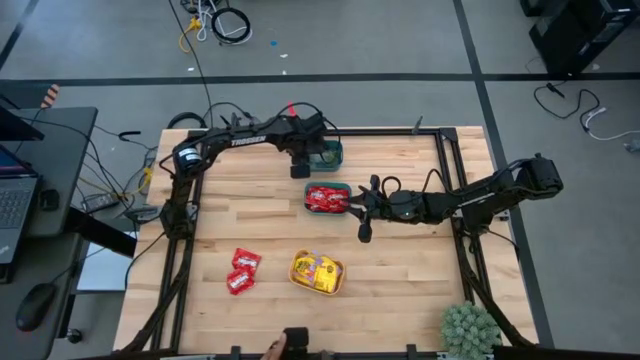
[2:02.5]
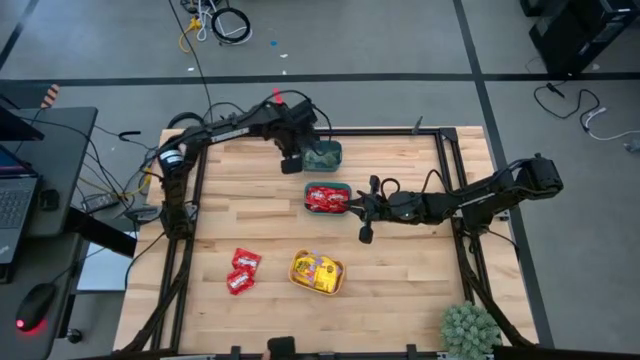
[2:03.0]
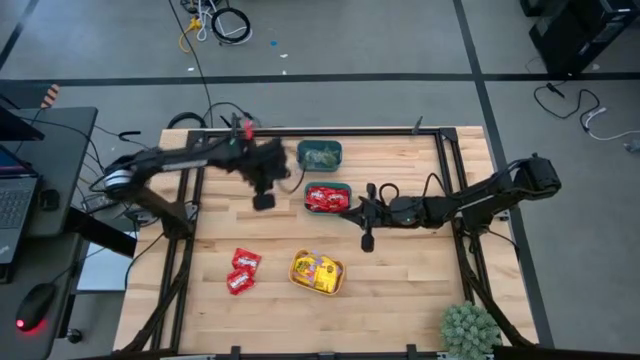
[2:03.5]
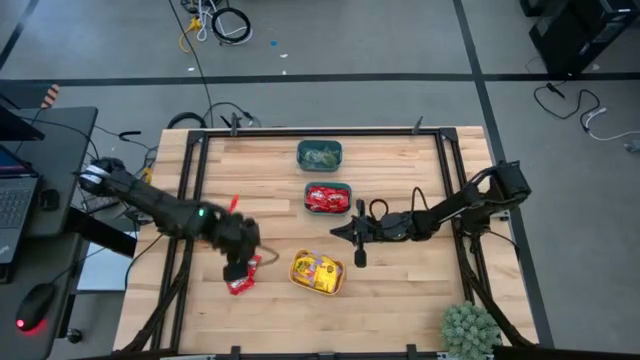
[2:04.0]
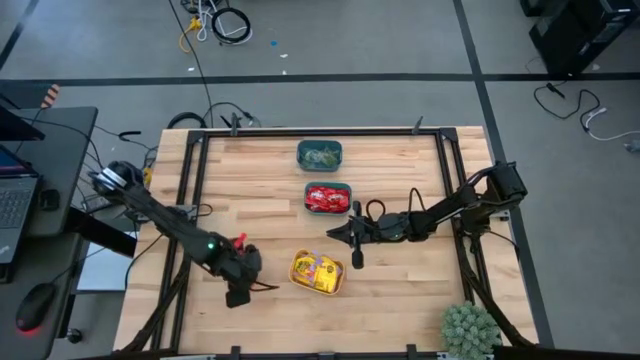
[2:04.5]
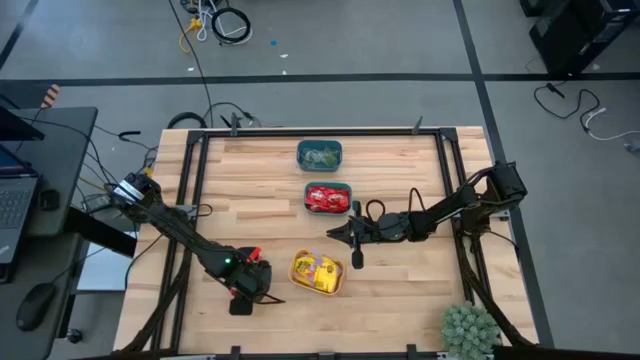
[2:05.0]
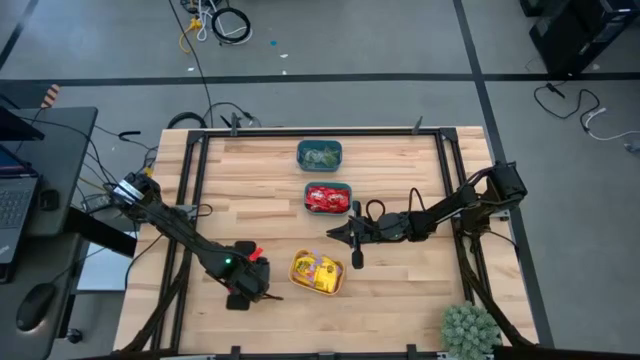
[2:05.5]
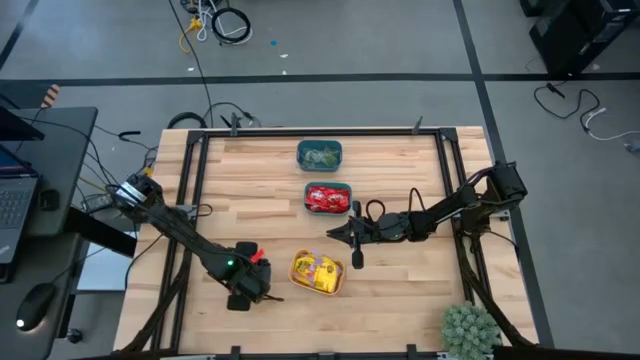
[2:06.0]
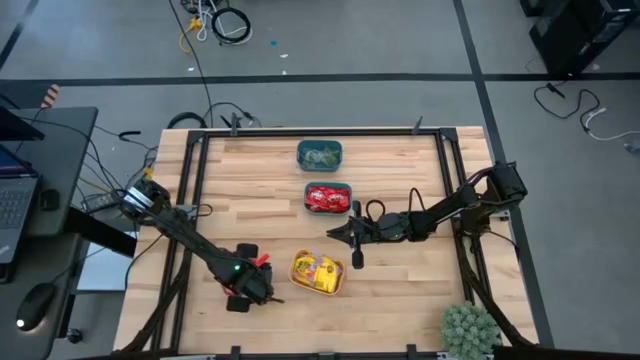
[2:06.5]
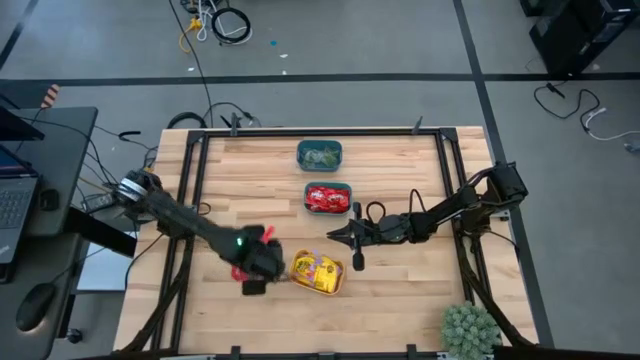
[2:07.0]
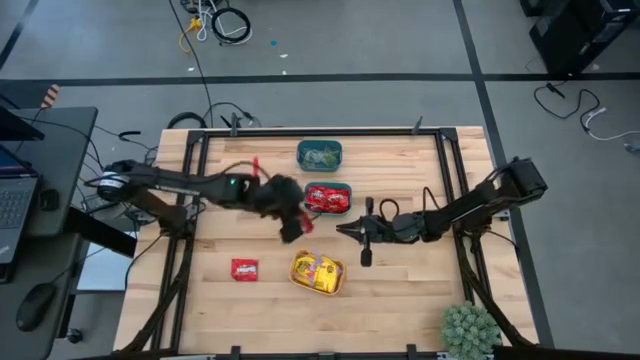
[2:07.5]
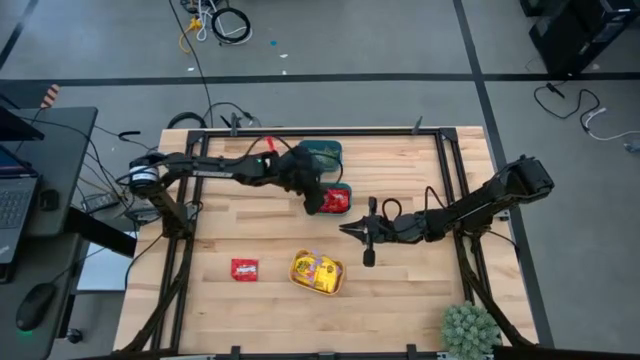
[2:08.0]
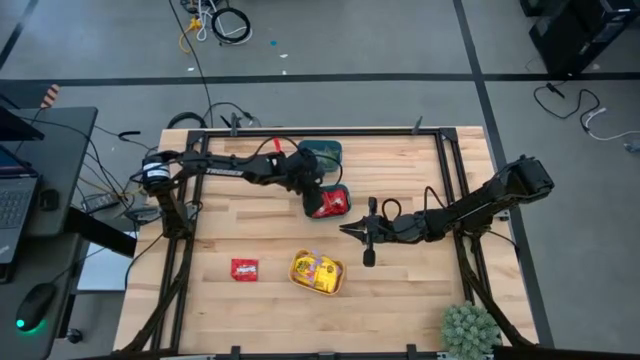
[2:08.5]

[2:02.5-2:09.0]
Task: Sort candy
Put the red candy into the green bin

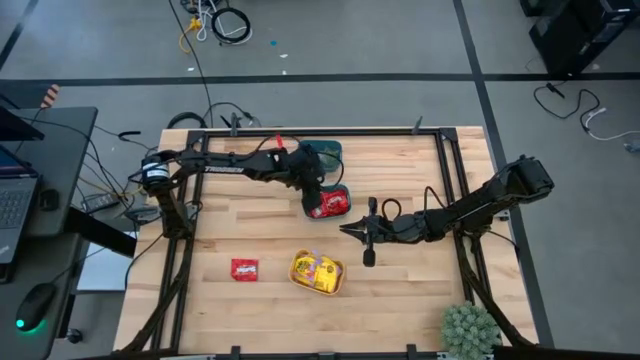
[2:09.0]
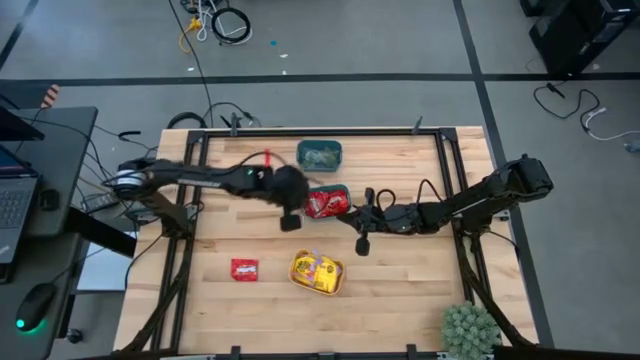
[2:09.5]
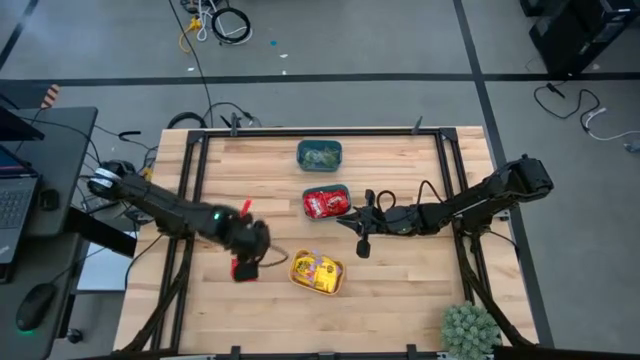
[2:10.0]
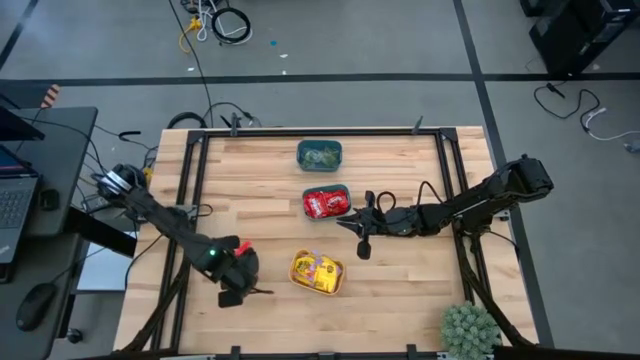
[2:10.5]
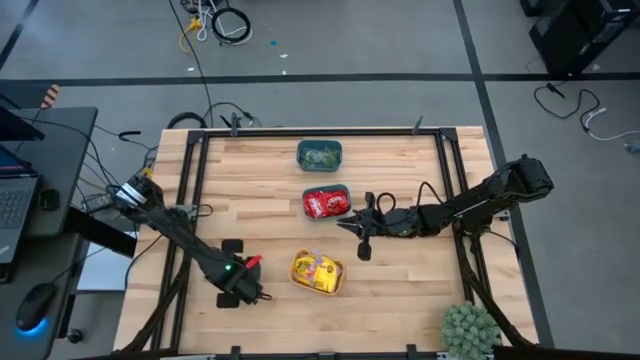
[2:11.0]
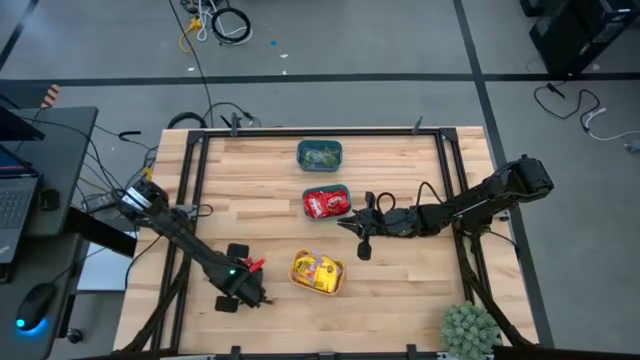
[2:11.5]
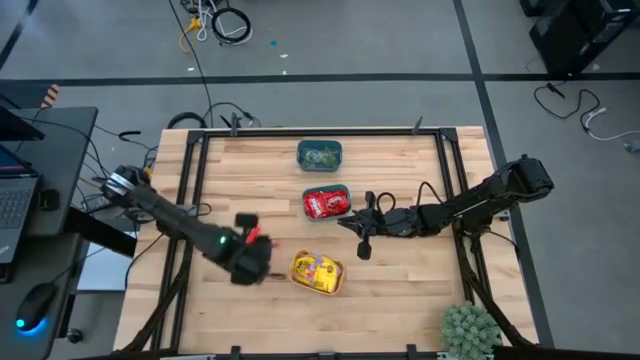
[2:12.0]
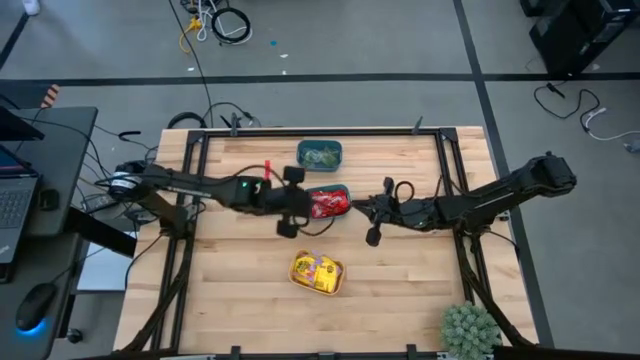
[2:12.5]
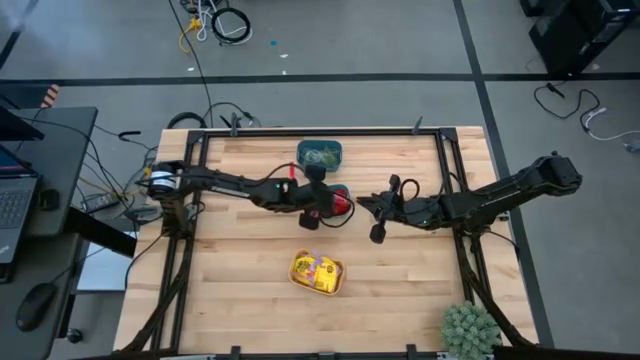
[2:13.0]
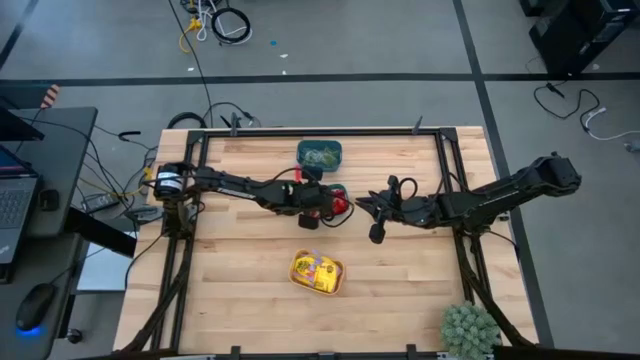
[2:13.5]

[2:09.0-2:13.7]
Put the red candy into the green bin

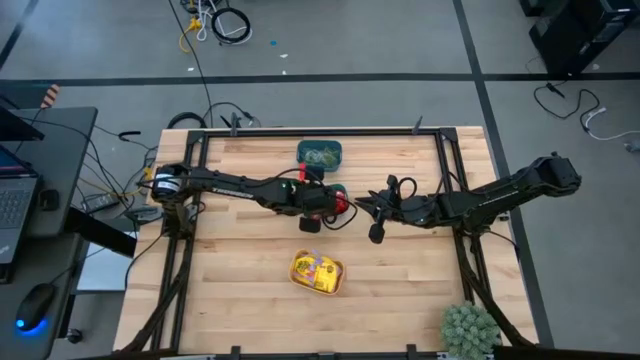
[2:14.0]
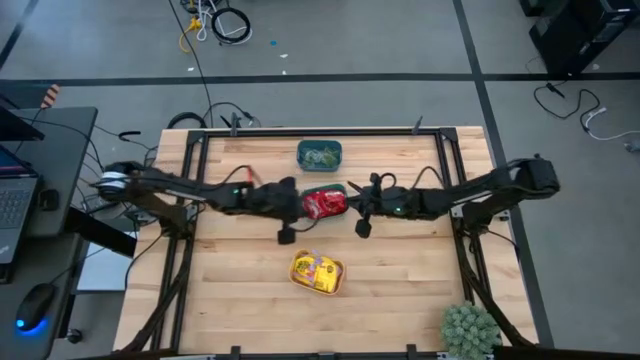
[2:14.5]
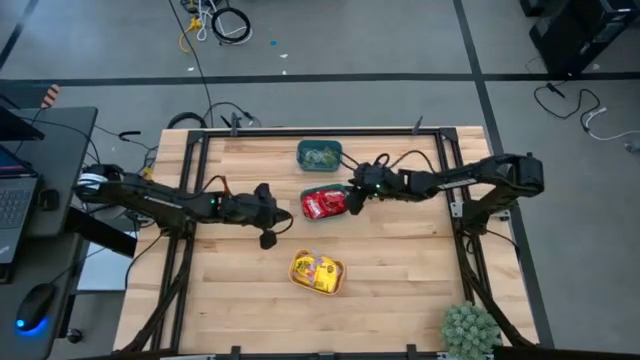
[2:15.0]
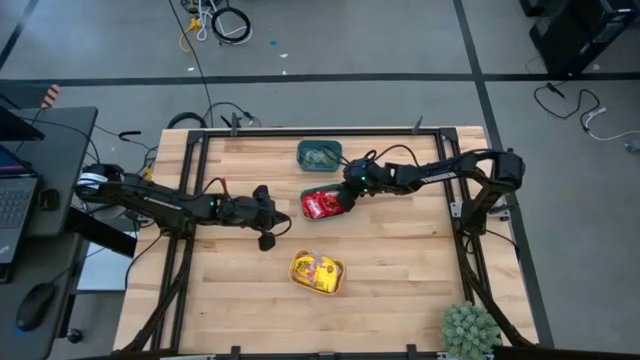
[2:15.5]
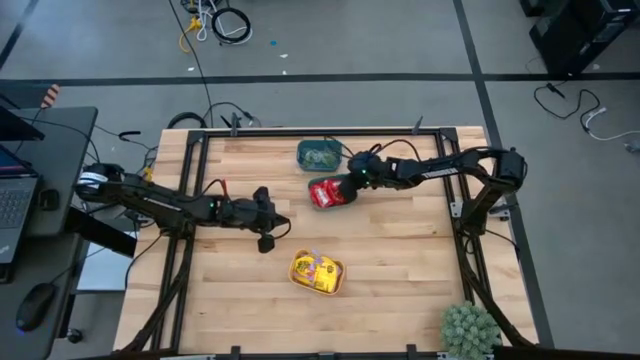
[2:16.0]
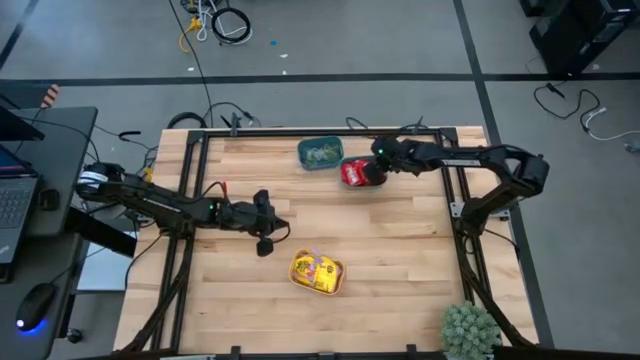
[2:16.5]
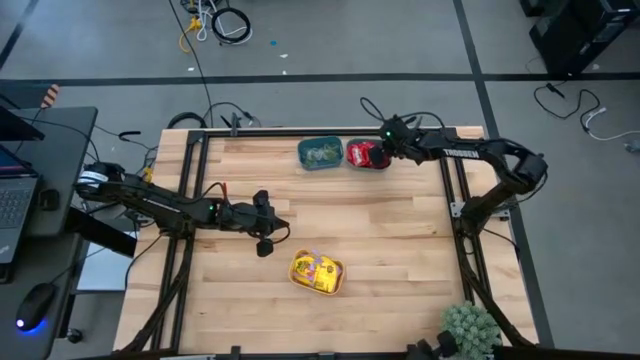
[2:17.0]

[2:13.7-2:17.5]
Move the green bin to the right of the blue bin

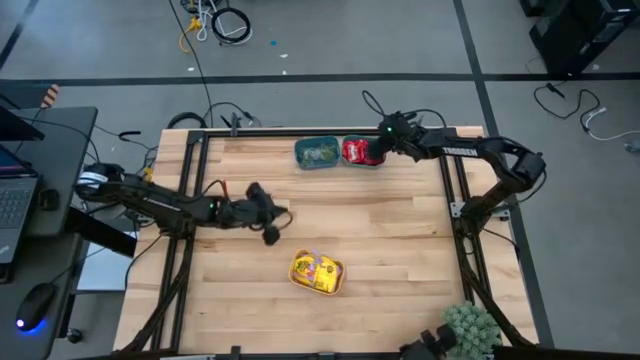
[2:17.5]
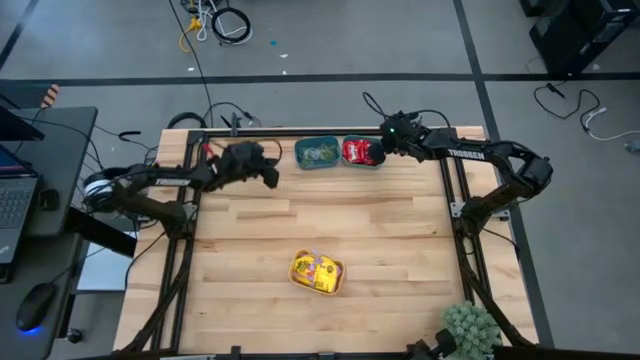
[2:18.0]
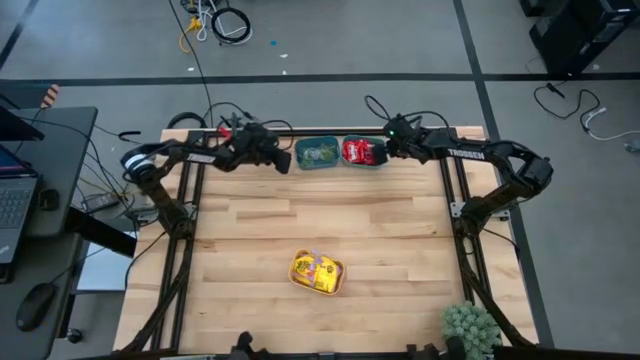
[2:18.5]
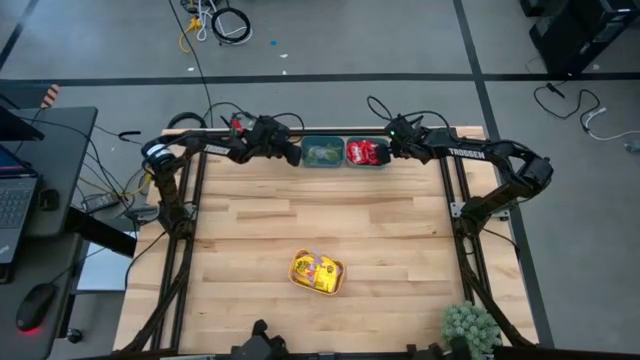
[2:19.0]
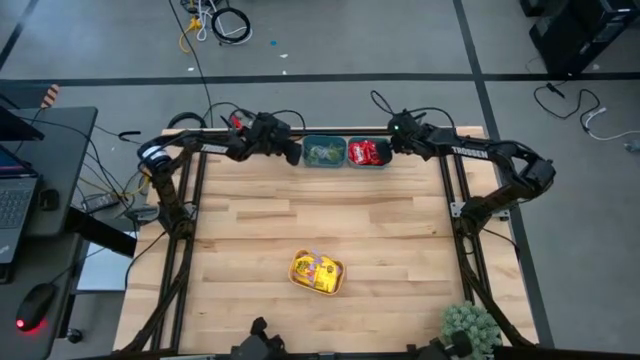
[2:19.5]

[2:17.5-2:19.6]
Adjust the blue bin and the green bin

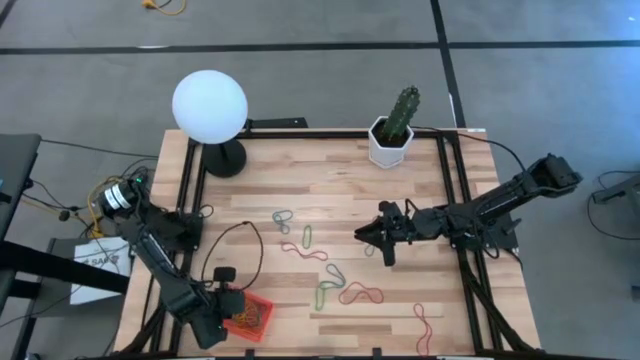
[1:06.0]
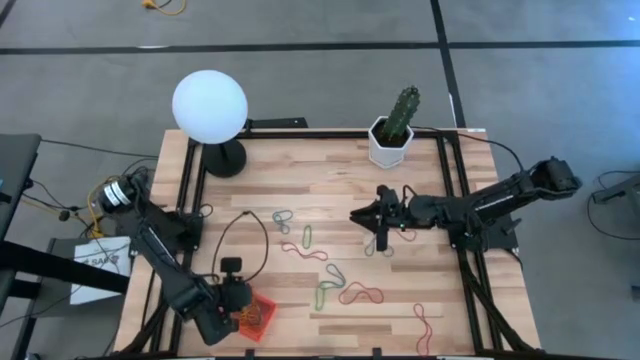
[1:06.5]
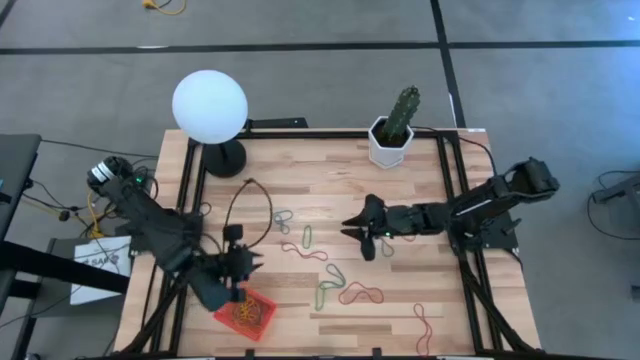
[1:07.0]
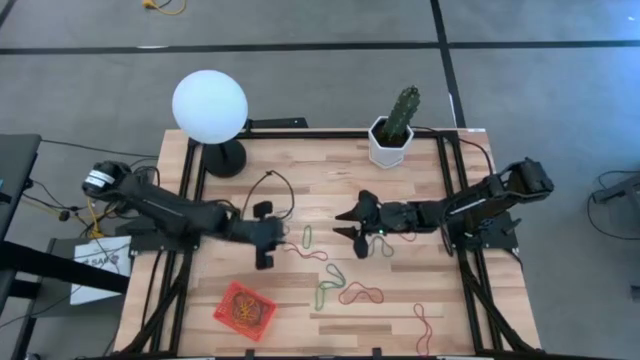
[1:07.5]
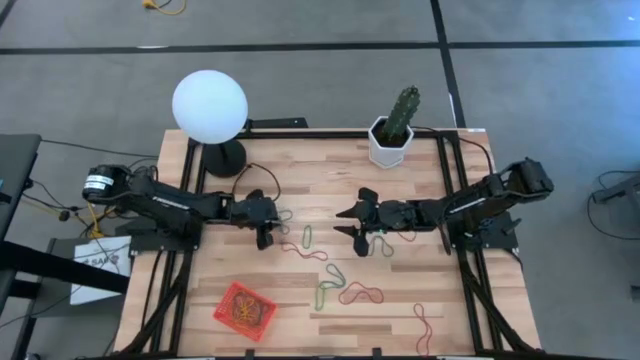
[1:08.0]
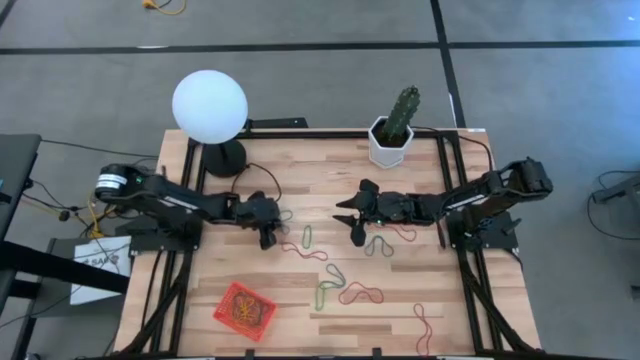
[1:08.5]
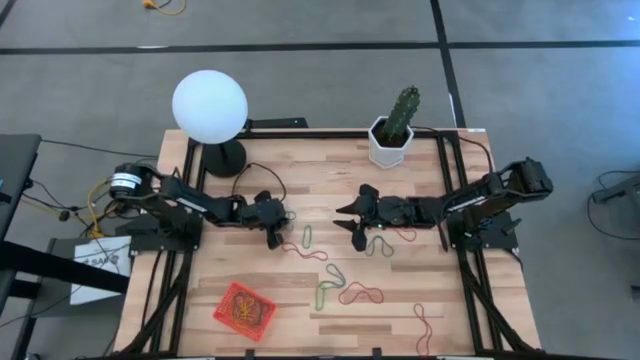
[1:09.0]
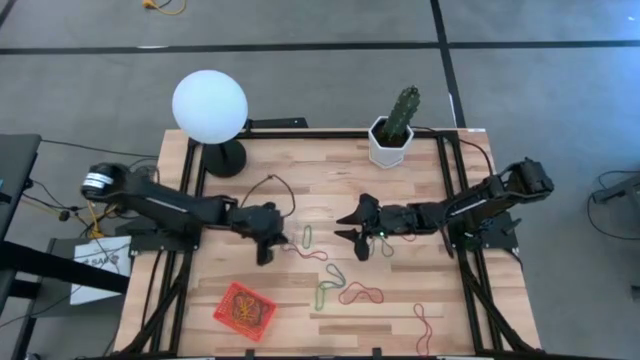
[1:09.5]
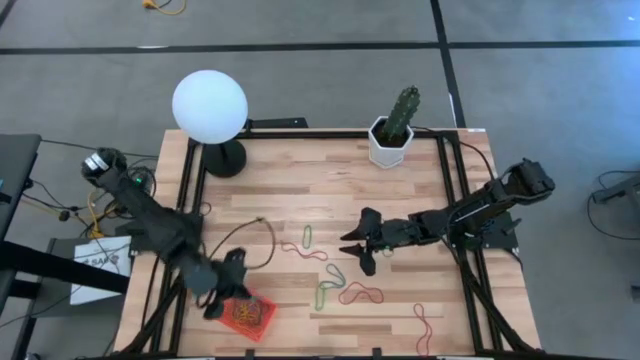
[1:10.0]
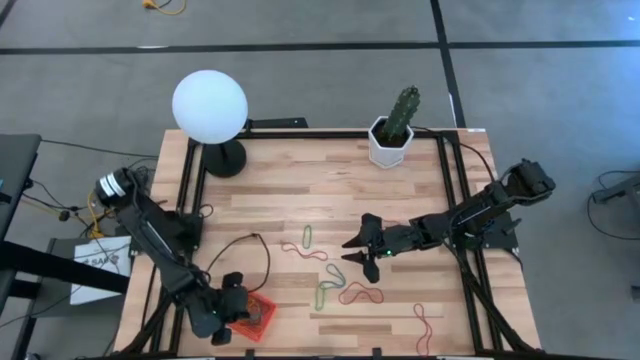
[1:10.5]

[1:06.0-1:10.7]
Task: Pick and place rubber bands into bin
Put the top left blue rubber band into the basket
